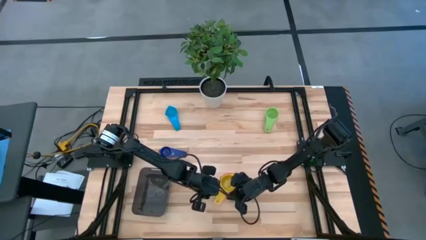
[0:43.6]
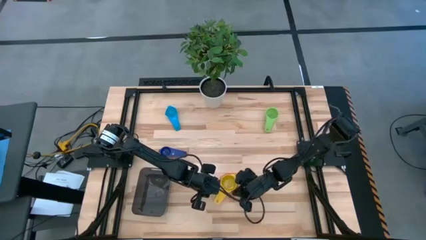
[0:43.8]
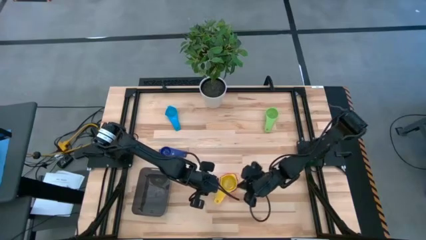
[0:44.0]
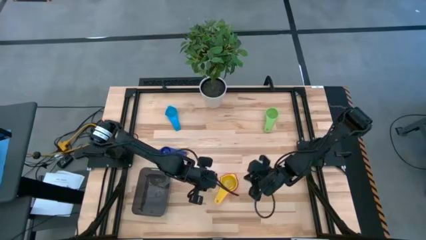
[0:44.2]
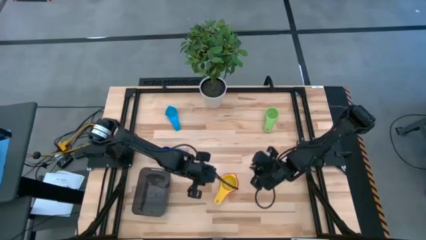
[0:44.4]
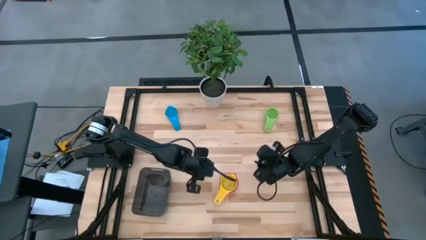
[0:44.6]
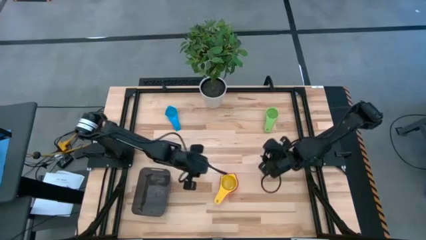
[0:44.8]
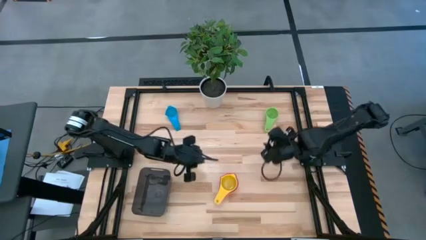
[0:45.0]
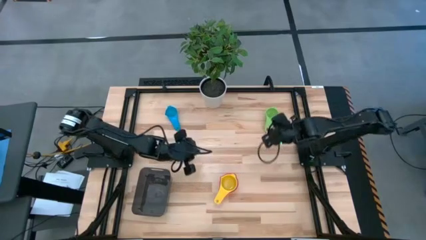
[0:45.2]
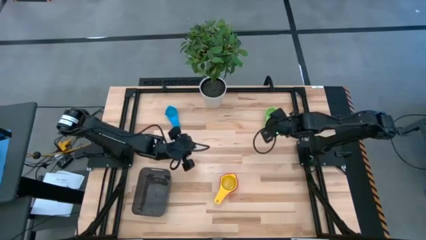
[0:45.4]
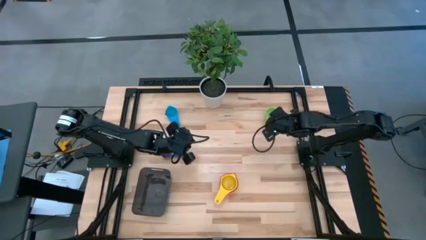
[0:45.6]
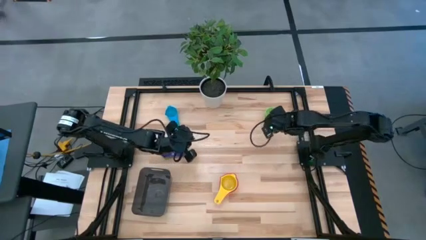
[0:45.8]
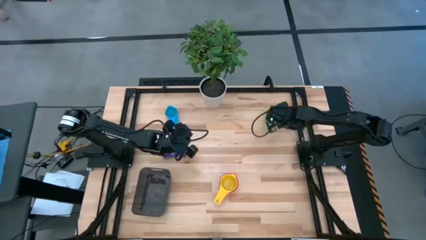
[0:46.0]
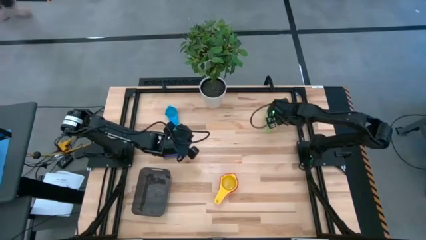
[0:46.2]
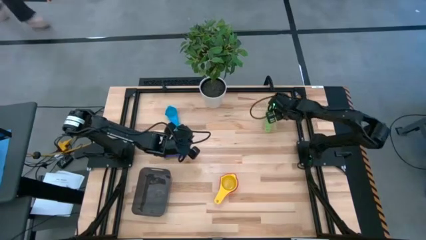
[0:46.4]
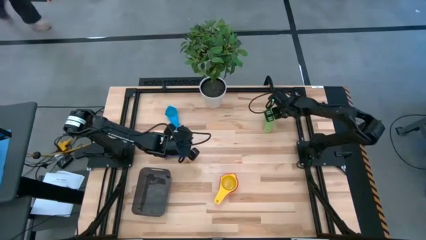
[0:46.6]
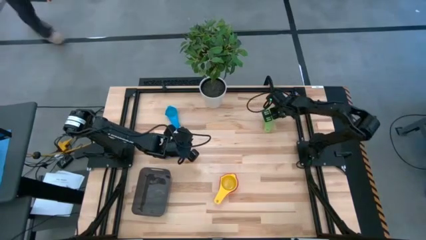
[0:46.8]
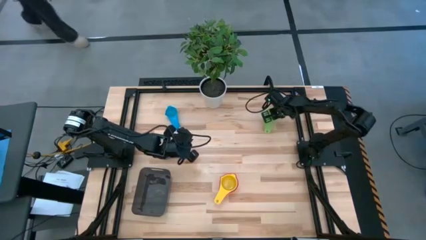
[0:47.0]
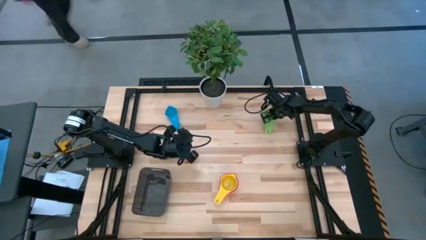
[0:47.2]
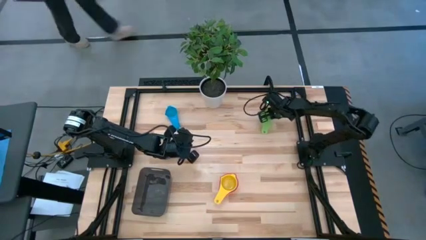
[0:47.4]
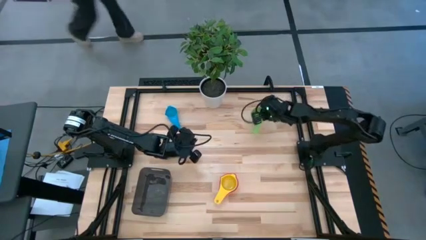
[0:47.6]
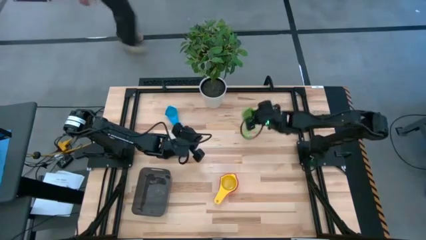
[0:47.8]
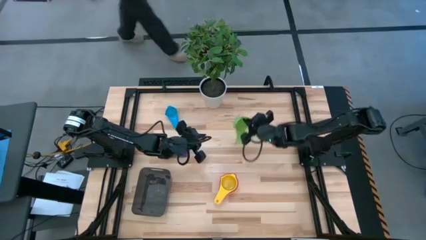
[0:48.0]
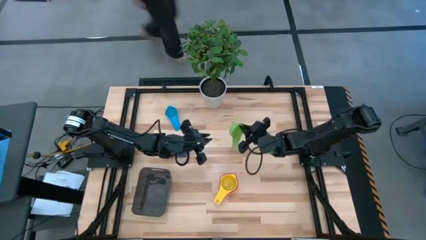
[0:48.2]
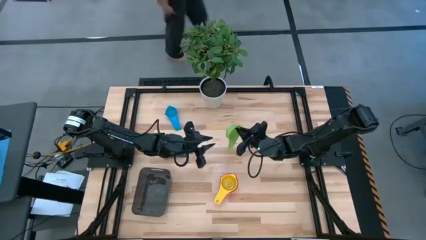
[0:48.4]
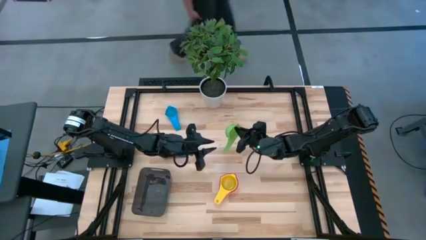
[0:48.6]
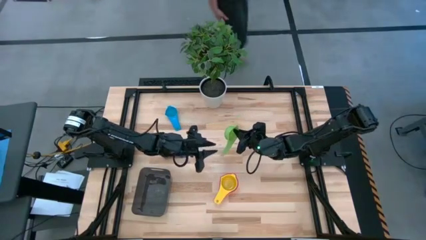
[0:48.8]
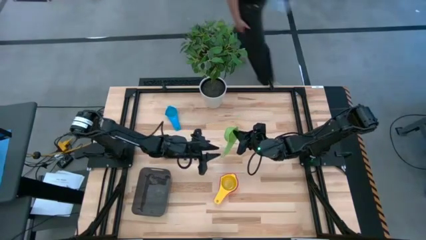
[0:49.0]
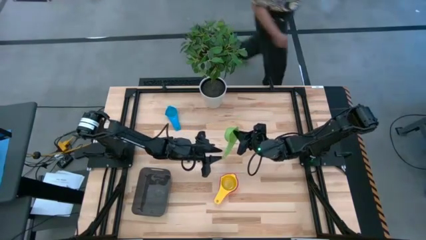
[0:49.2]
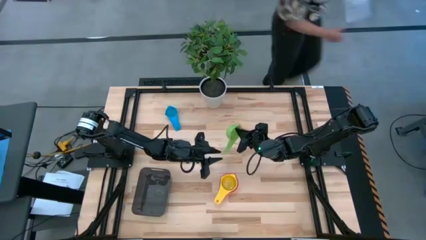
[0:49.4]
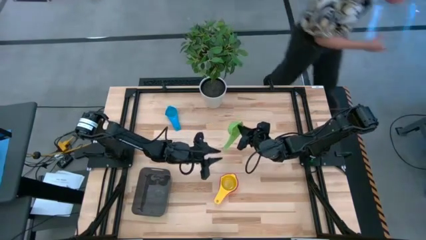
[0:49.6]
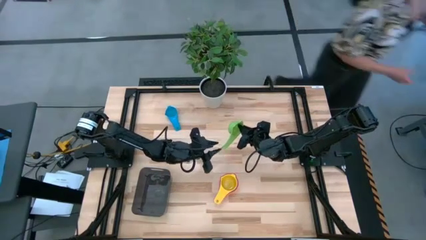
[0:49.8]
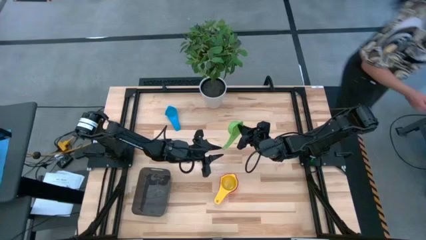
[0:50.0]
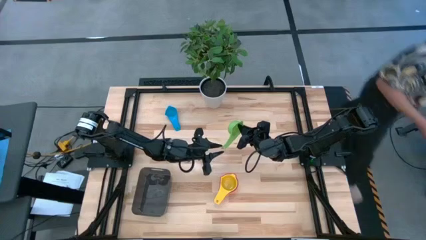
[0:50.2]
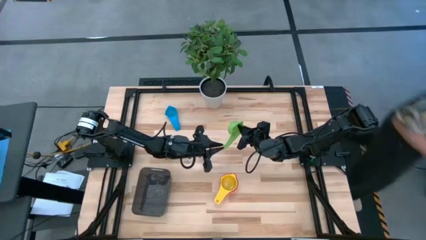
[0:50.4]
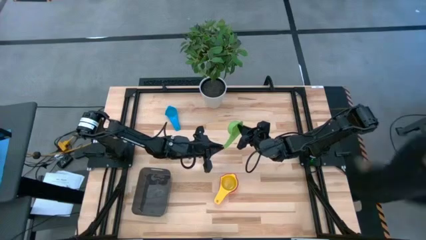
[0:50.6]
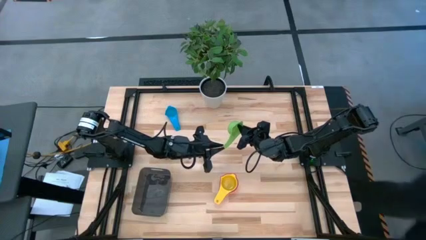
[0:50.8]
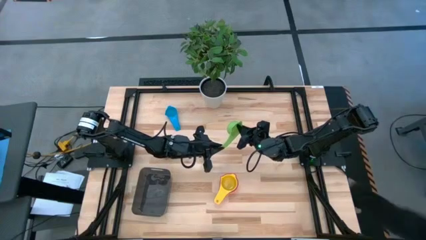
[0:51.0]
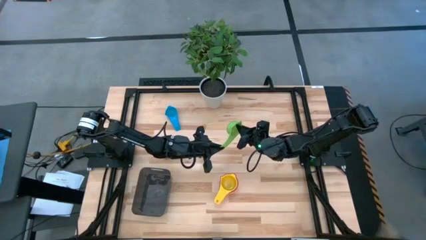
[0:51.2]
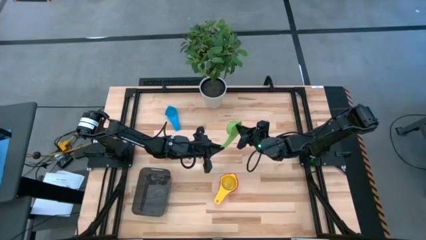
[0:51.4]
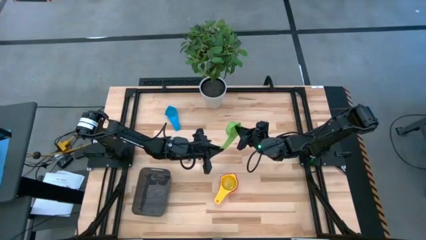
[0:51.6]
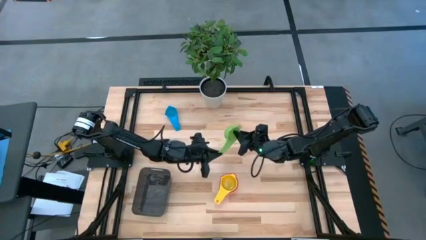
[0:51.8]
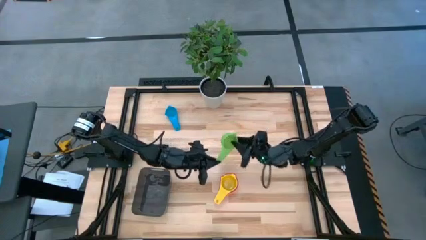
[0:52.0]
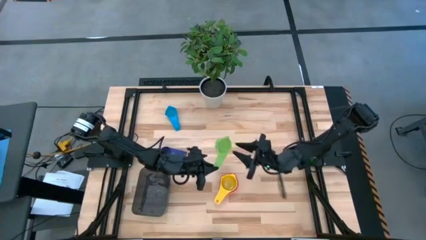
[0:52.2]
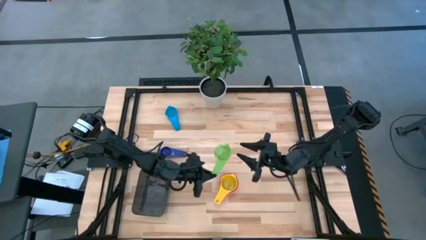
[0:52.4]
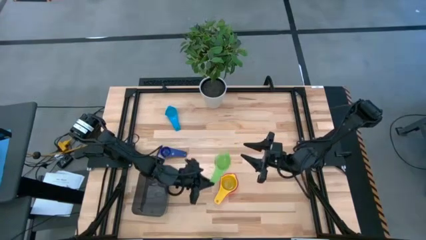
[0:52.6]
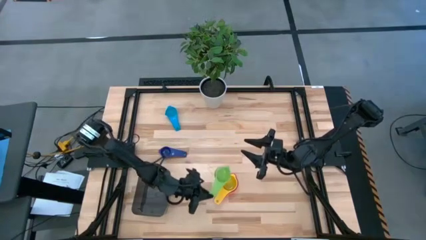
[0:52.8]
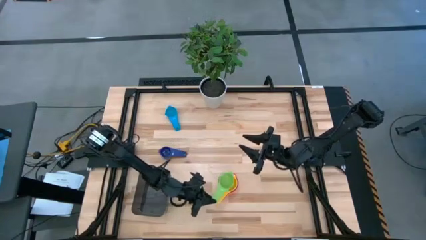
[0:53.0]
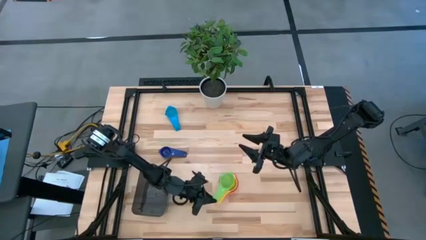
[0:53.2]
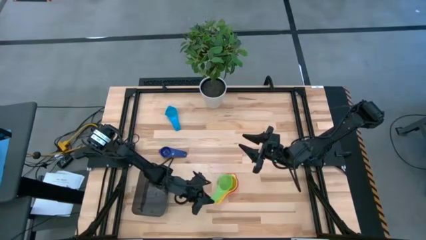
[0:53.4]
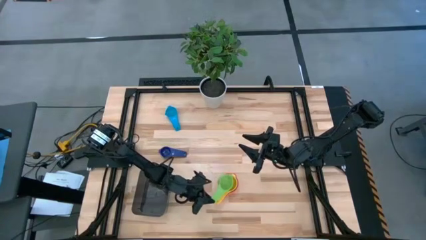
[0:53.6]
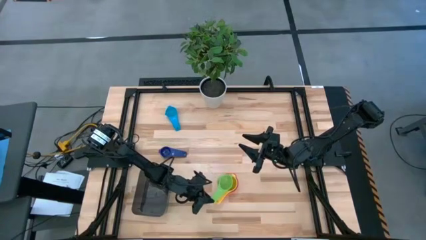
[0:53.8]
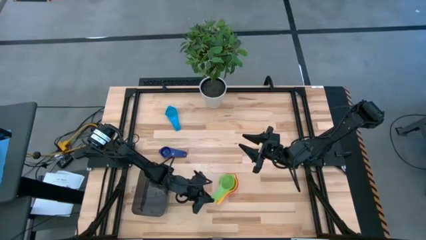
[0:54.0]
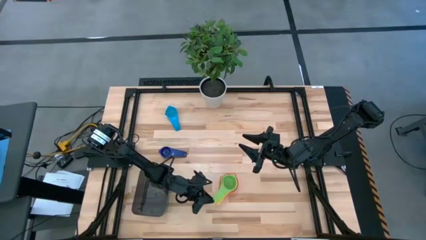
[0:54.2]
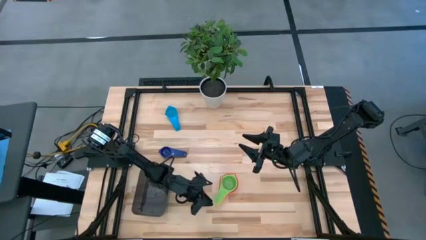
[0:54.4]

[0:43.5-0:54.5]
Task: Nest measuring cups in basket
Stack the green measuring cup on top of the yellow measuring cup

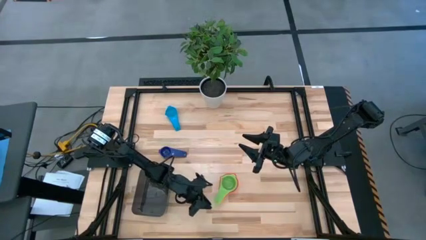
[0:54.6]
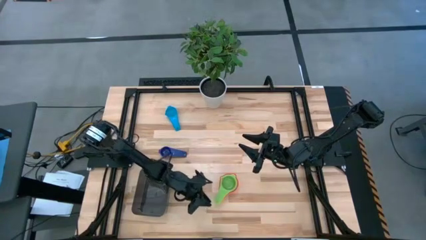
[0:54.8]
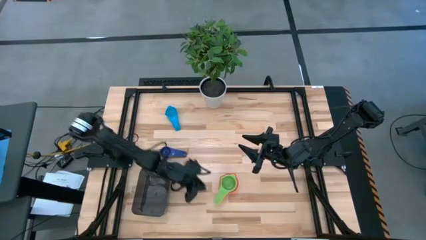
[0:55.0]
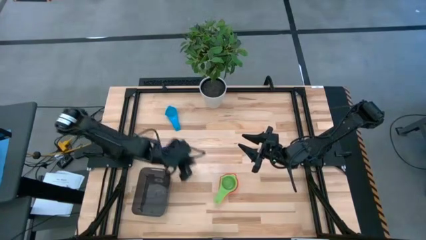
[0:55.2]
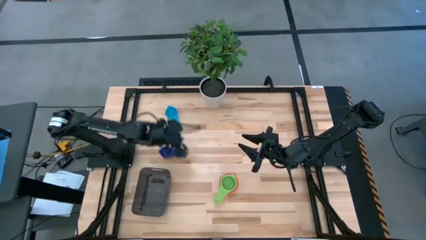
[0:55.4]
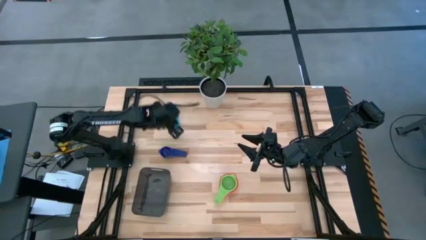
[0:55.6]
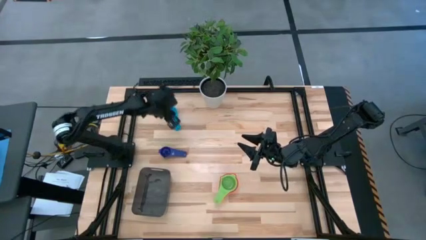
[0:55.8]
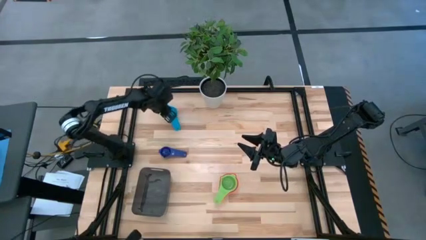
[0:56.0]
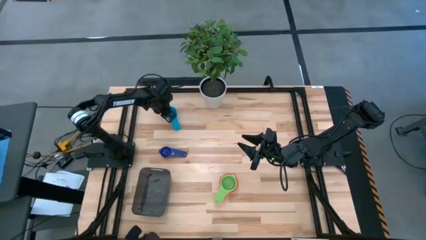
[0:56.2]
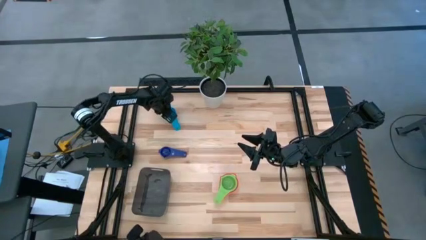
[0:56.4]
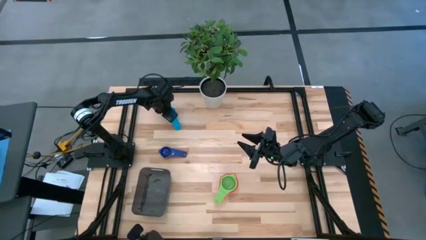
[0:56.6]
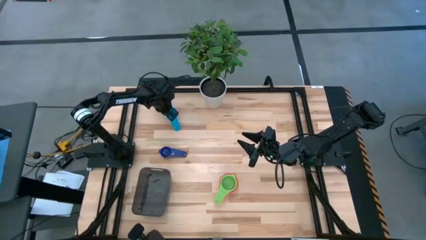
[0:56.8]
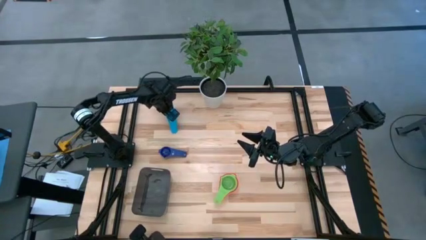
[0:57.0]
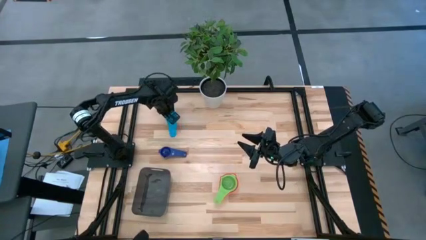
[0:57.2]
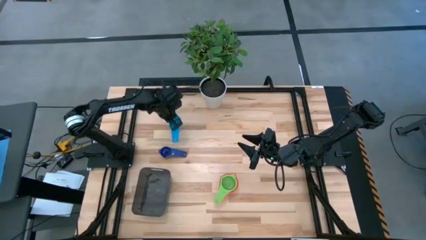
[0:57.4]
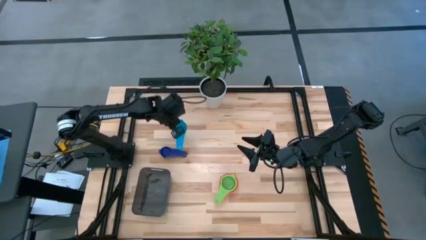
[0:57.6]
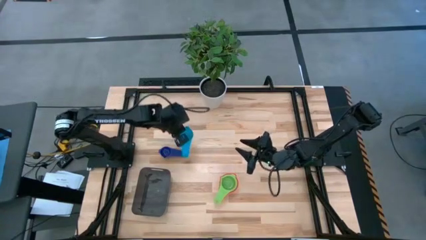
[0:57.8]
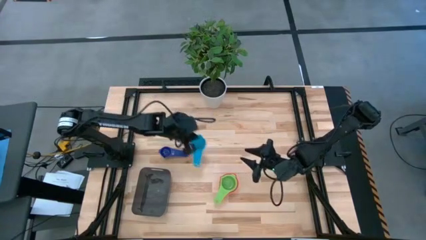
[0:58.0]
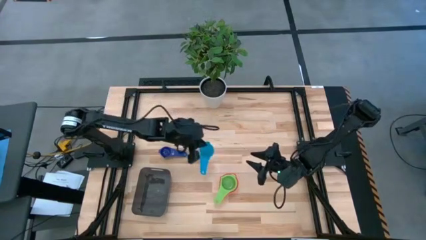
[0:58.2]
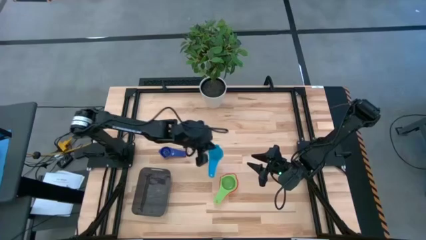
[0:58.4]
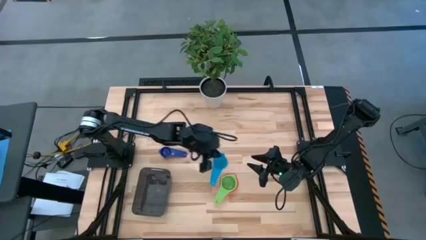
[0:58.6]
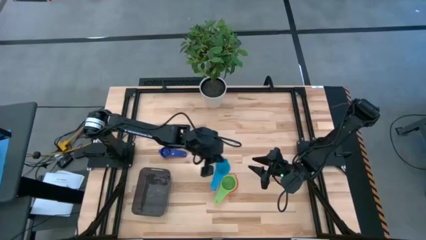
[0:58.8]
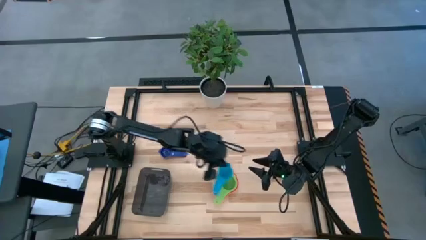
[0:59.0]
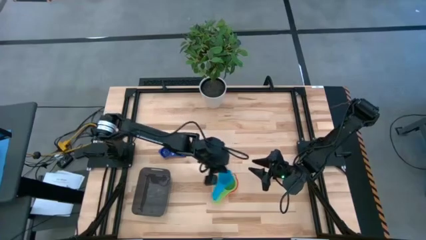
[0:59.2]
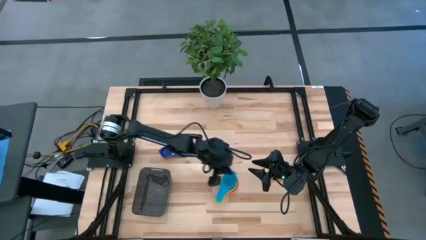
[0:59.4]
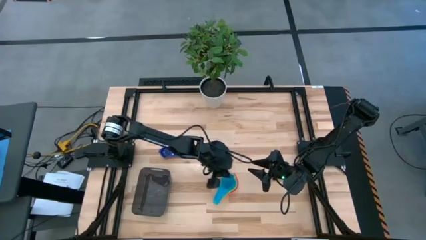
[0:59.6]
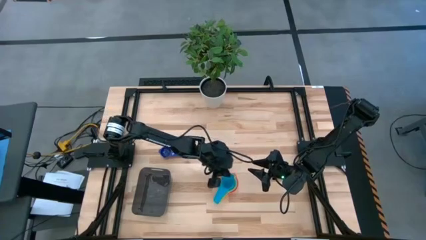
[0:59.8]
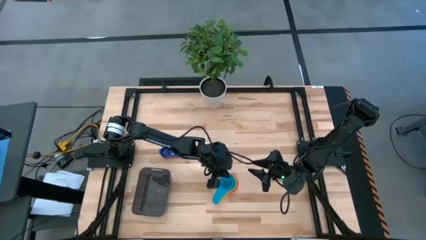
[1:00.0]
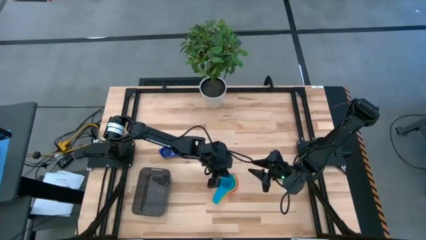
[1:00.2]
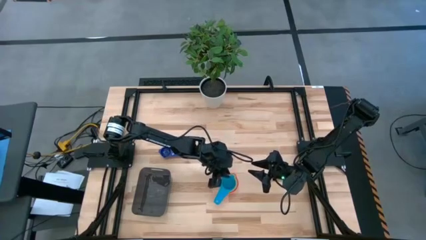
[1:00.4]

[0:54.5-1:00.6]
Stack the light blue measuring cup on top of the green measuring cup

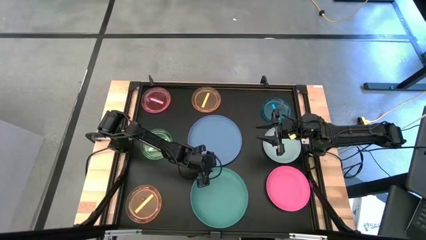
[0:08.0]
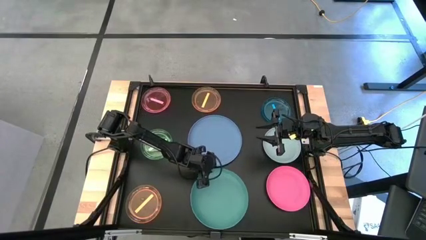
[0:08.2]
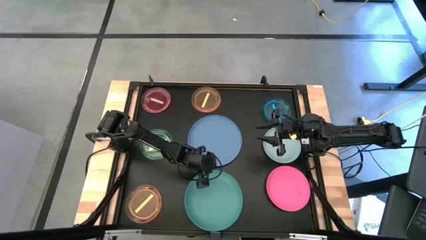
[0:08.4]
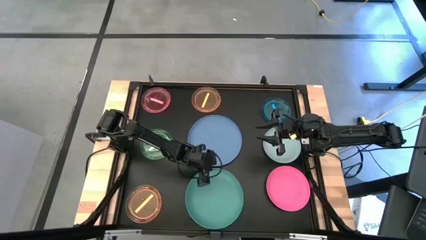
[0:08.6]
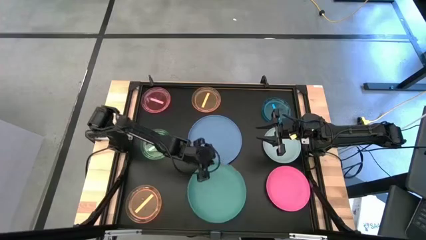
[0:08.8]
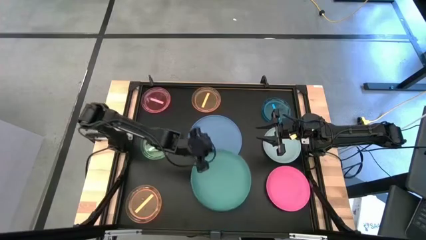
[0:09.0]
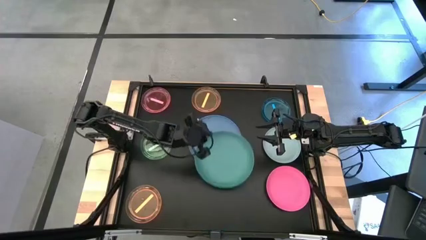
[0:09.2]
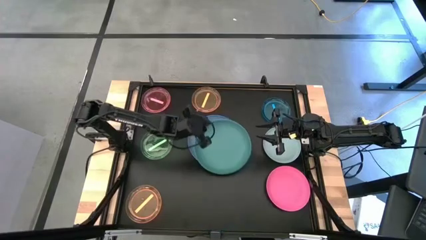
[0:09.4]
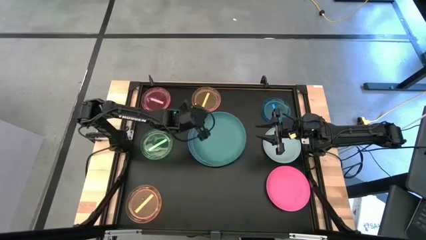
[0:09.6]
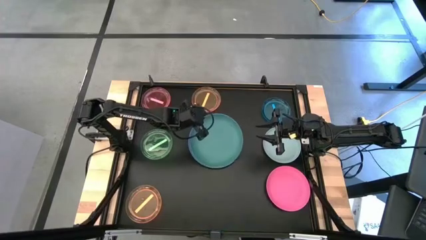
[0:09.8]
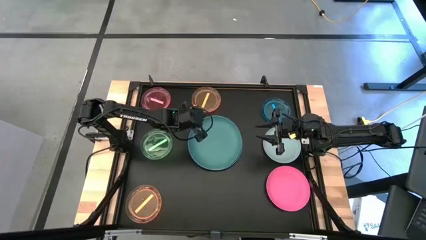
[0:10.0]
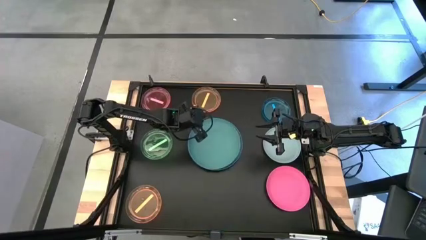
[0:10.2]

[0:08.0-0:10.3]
Task: Stack plastic plates
Stack the green plate on top of the blue plate
